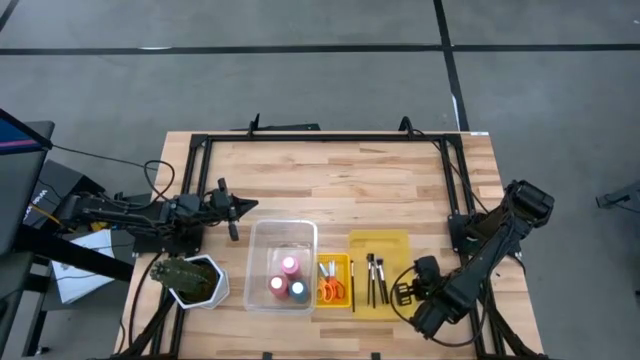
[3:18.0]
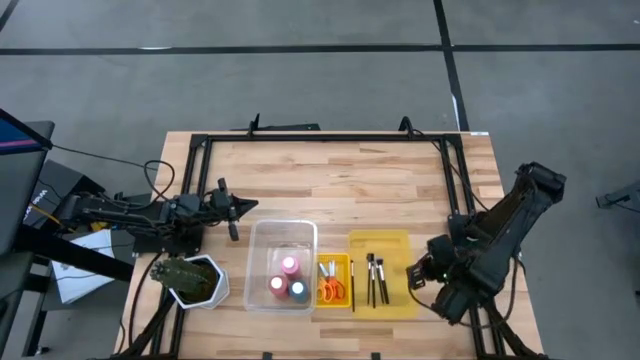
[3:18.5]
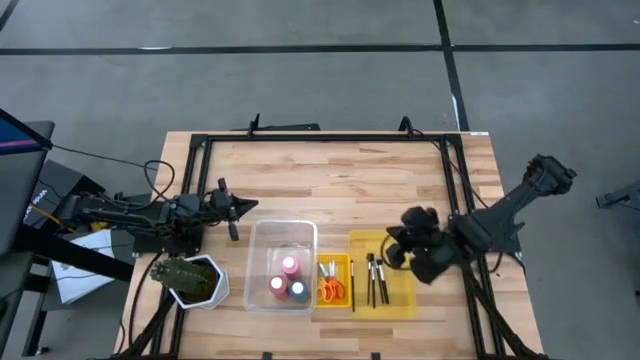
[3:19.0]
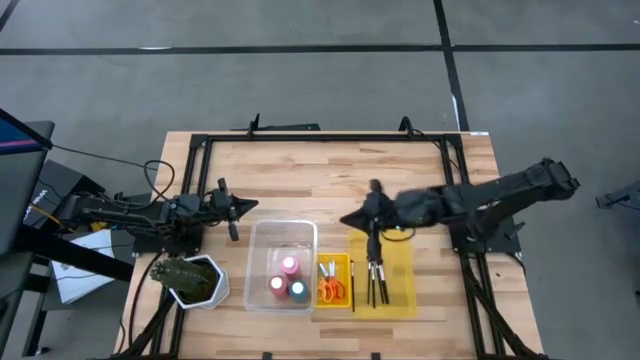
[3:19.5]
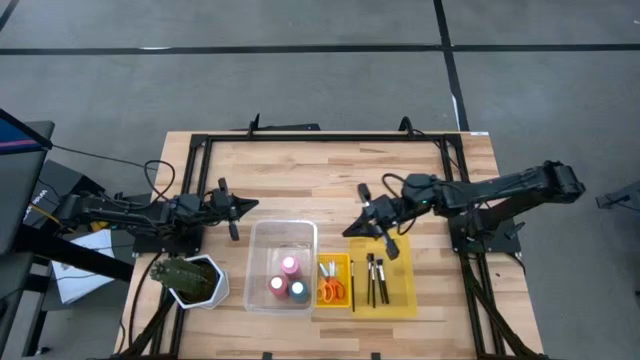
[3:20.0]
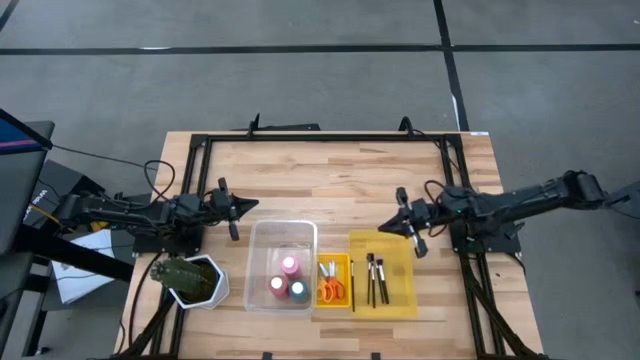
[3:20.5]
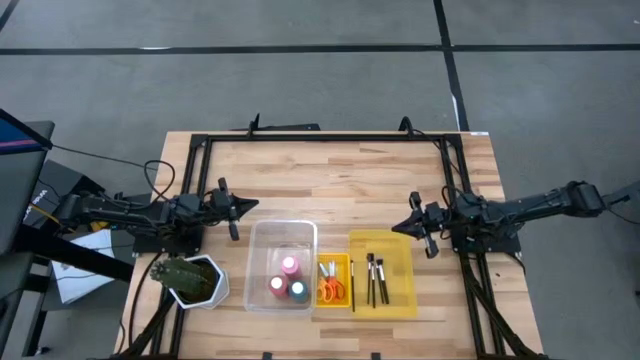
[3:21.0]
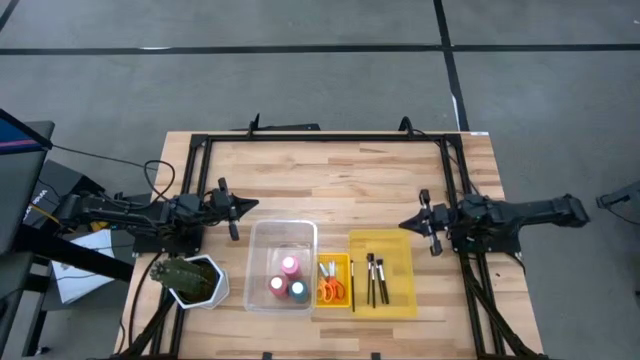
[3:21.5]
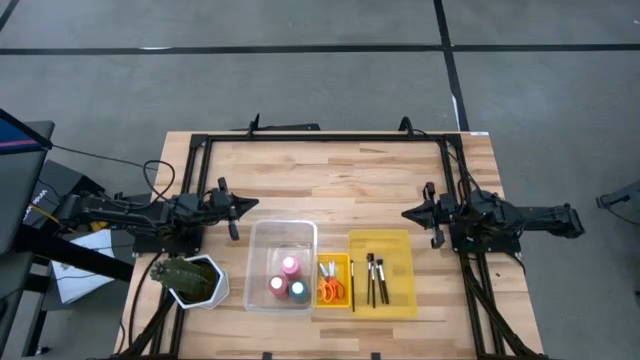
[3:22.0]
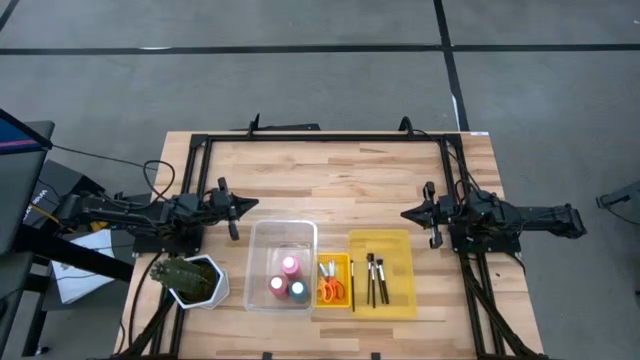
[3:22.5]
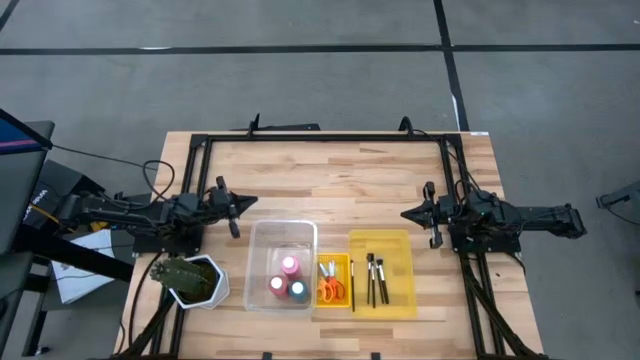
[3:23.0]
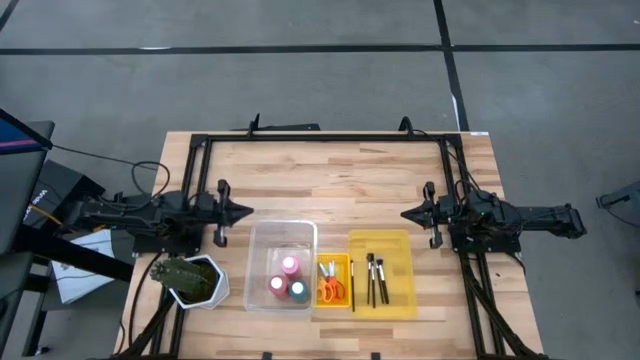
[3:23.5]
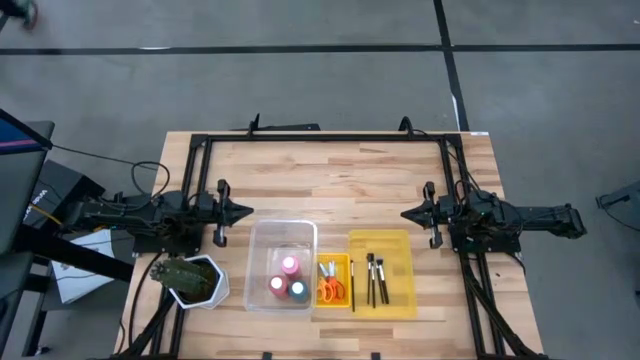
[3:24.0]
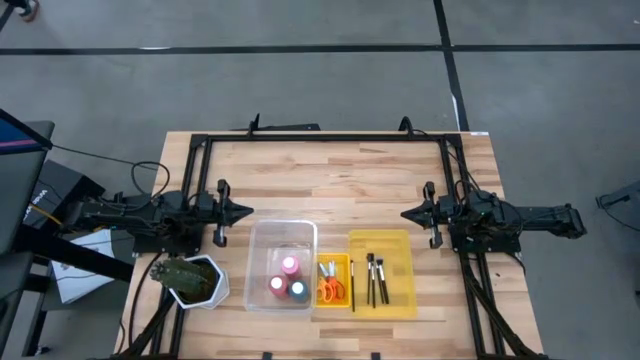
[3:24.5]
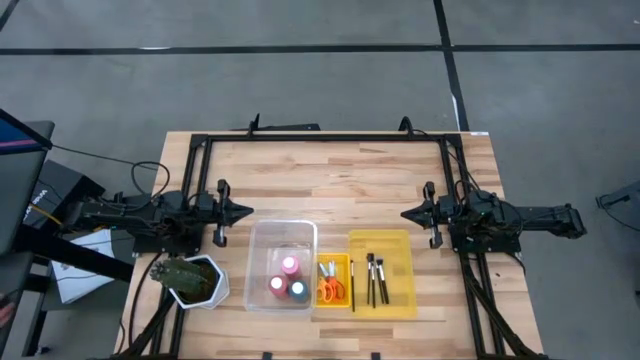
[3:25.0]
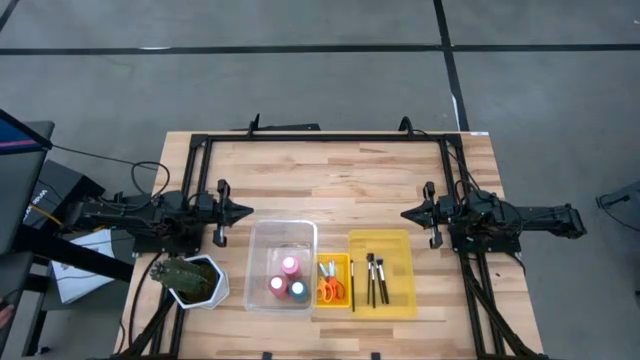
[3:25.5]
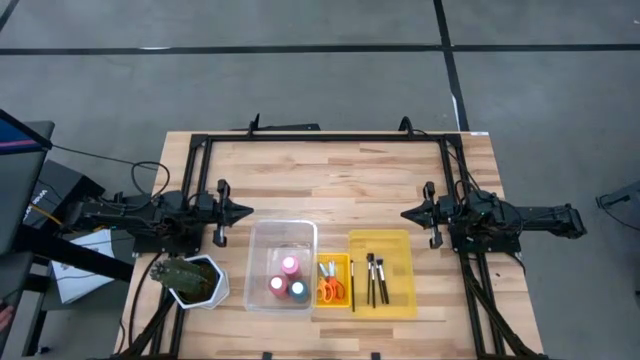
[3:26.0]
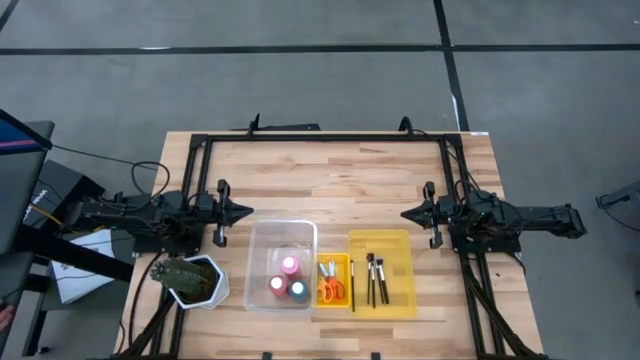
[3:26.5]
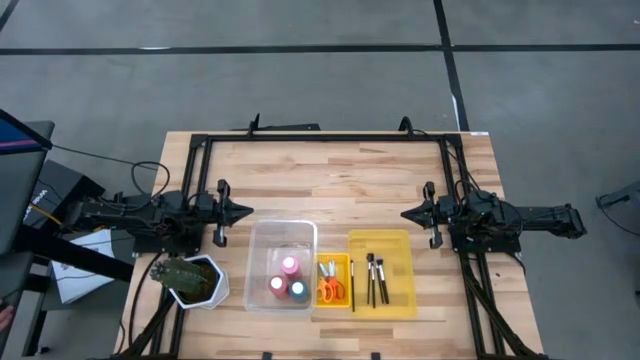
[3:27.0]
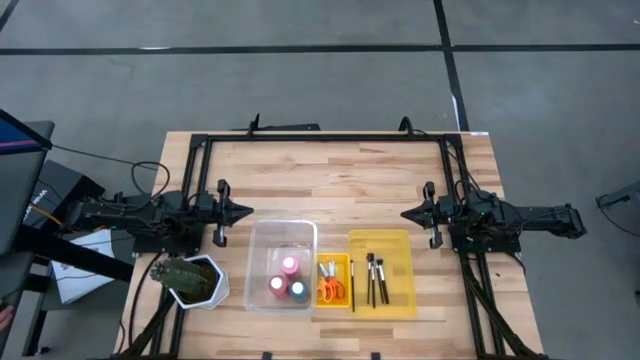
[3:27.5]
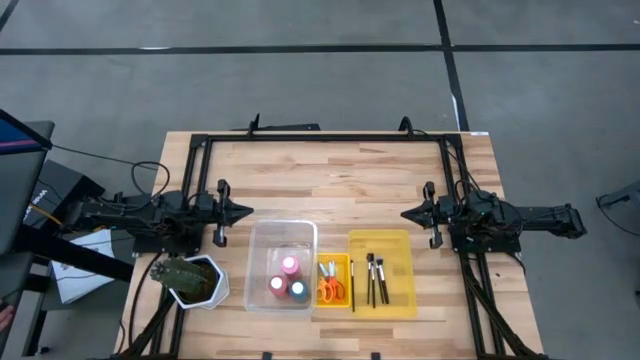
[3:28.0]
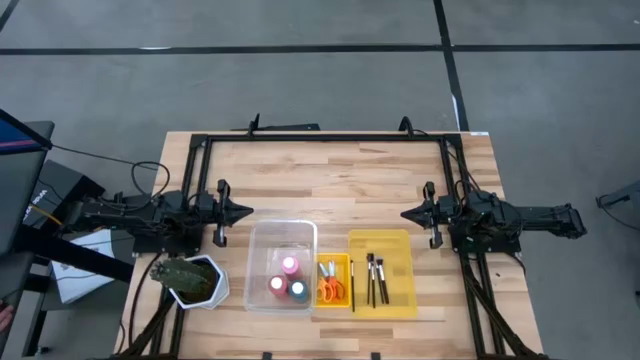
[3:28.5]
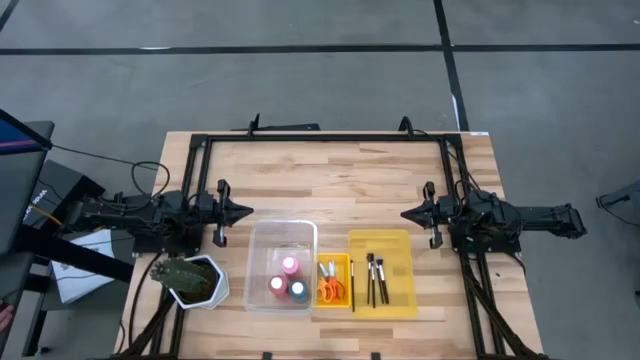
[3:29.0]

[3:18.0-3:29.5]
Task: Pick & Place Paint Supplies
Return to Home Position
